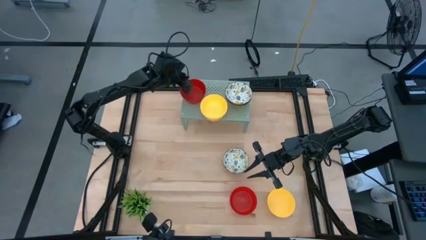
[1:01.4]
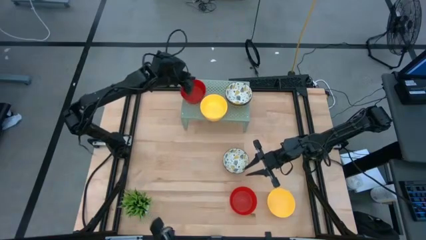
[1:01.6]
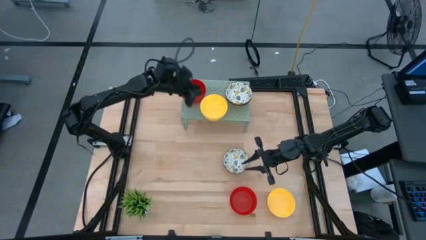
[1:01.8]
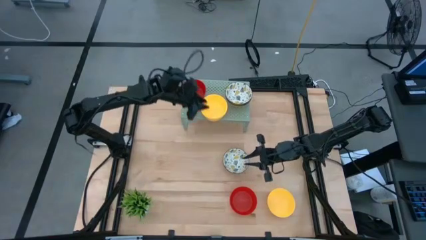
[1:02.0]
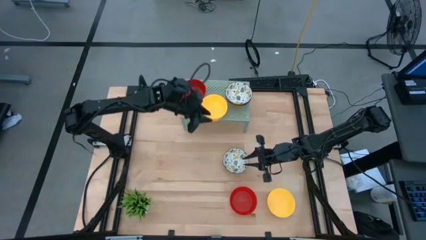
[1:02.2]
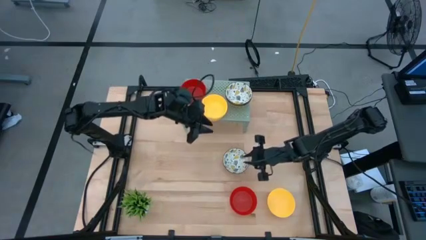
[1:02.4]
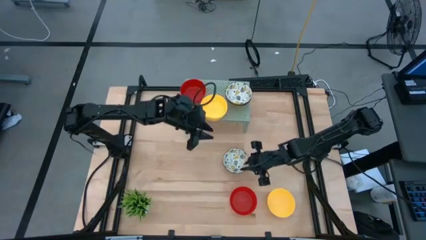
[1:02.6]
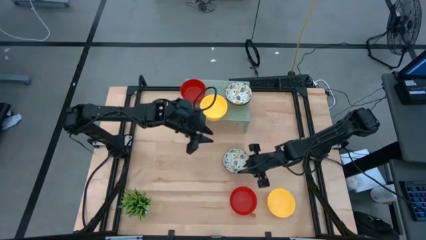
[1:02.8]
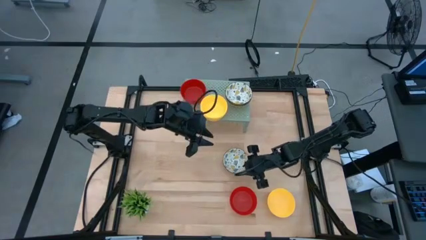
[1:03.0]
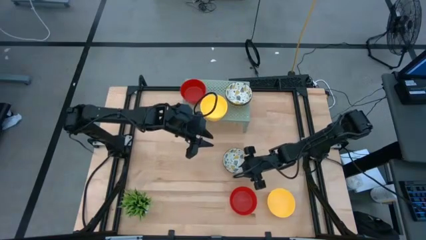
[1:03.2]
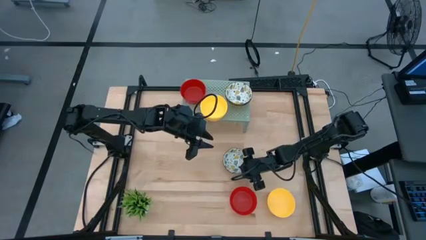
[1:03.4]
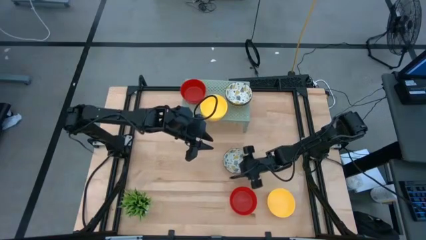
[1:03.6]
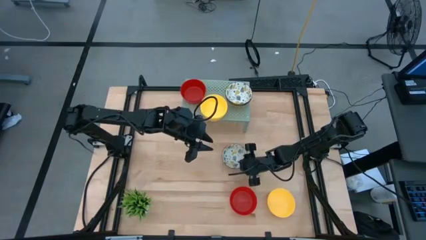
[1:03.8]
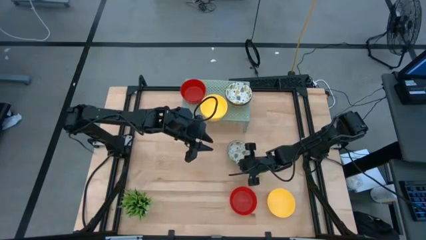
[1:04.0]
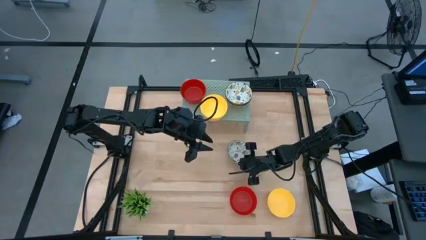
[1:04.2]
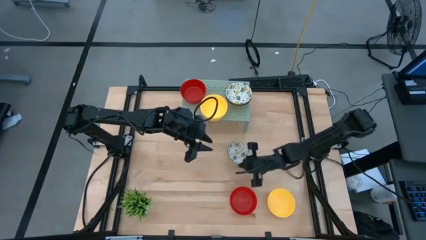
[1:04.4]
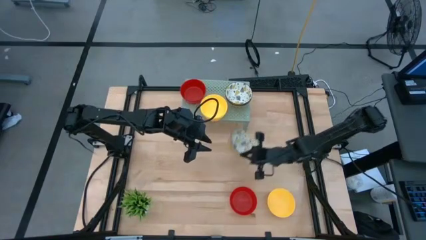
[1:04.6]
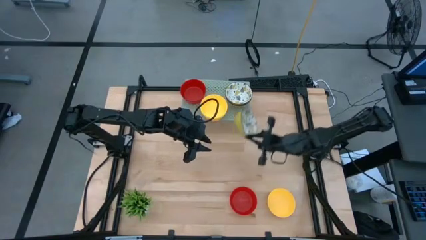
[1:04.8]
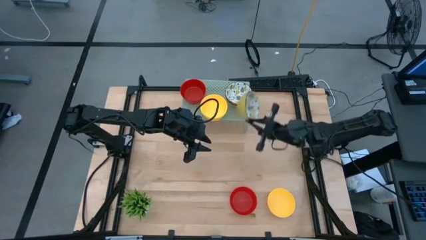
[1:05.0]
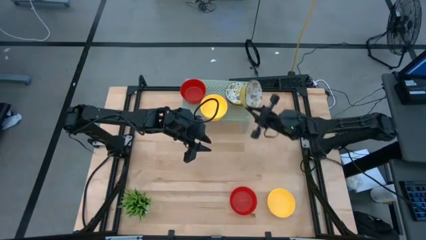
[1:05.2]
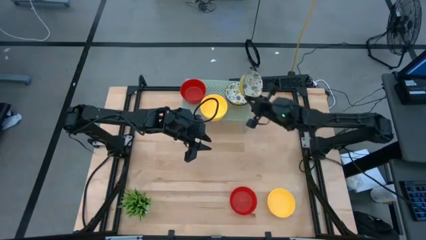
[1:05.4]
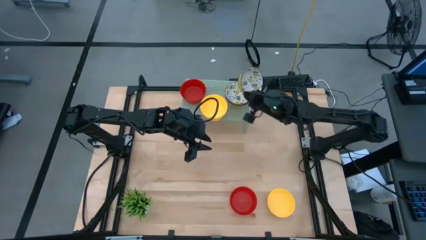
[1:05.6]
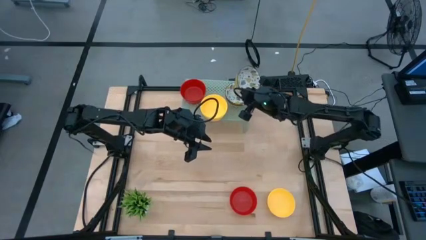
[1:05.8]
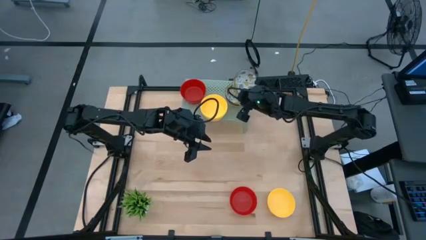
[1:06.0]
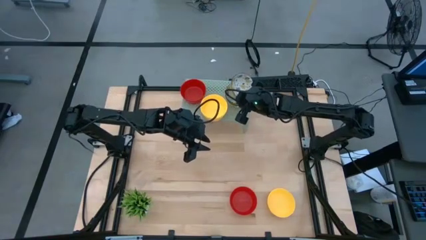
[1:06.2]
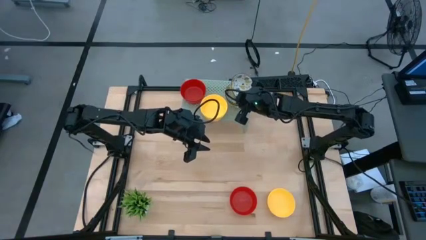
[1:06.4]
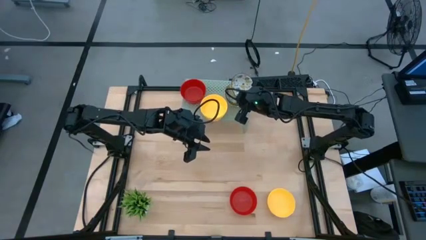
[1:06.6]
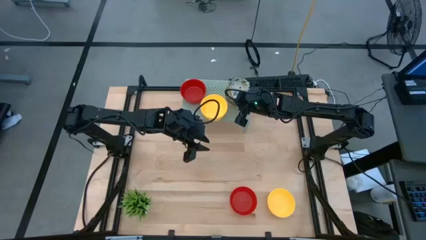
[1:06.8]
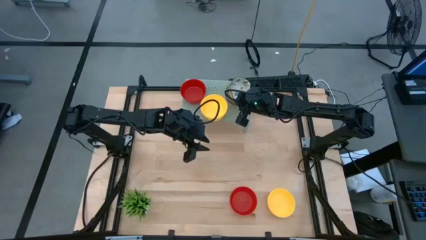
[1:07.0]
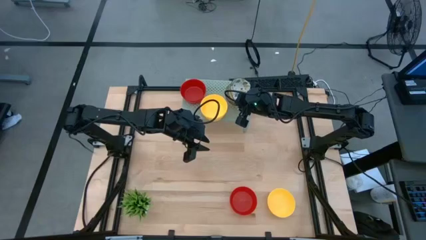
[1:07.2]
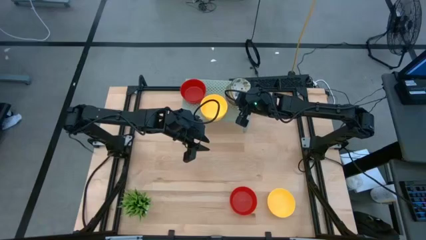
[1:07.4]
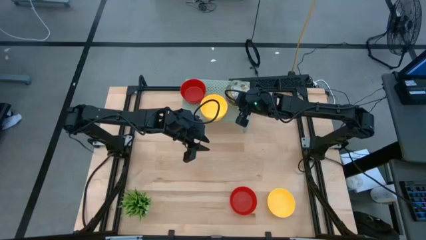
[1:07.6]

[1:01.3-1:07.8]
Task: Pick & Place Mini bowls
Stack the white patterned bowl on the white patterned bowl on the shelf

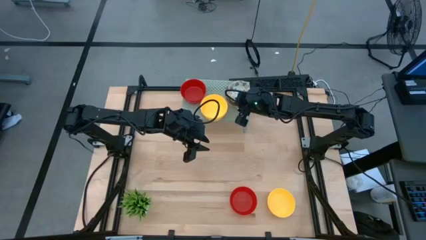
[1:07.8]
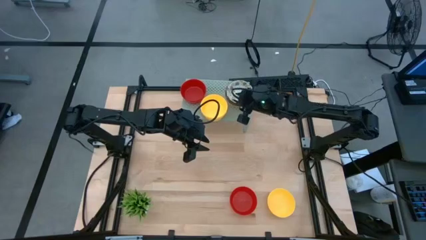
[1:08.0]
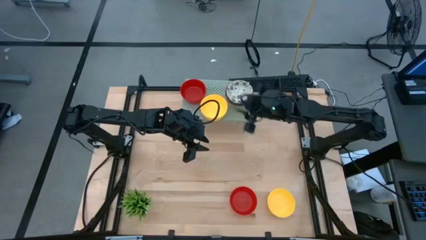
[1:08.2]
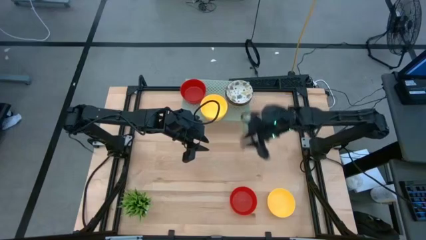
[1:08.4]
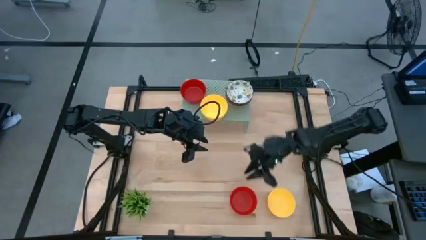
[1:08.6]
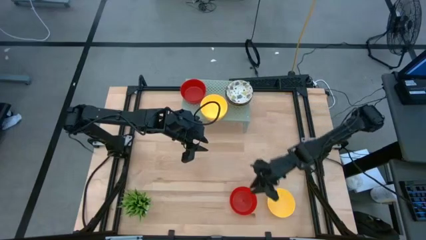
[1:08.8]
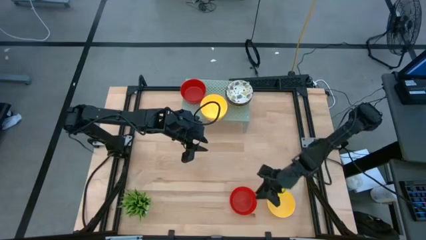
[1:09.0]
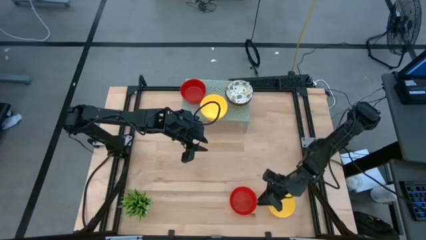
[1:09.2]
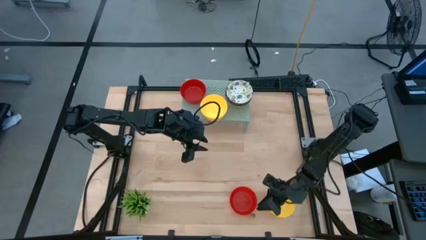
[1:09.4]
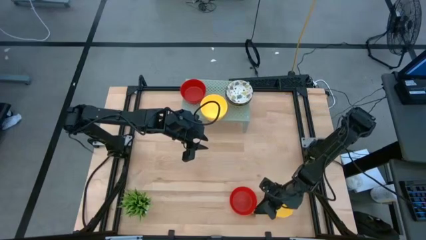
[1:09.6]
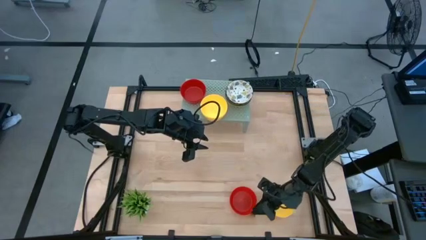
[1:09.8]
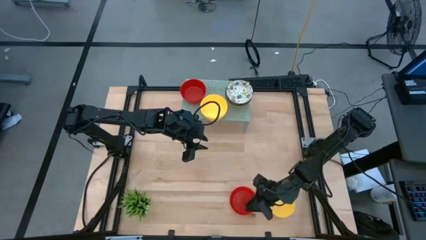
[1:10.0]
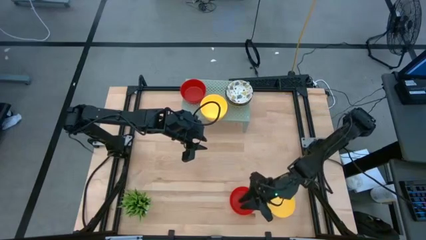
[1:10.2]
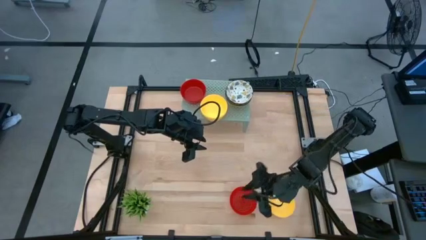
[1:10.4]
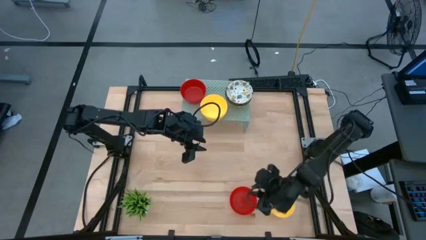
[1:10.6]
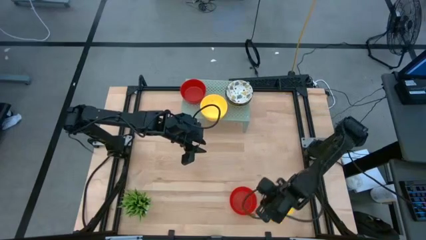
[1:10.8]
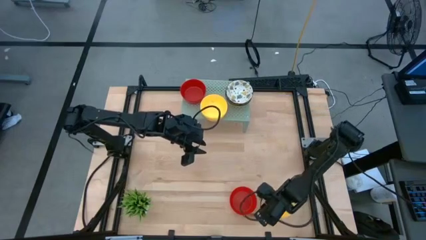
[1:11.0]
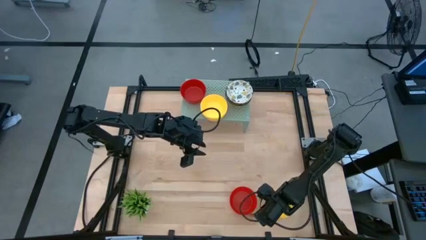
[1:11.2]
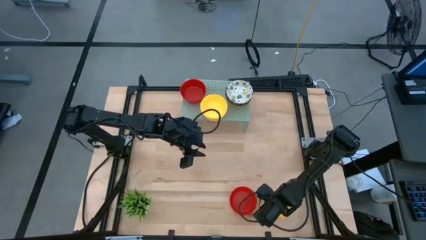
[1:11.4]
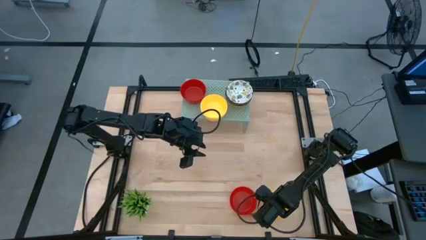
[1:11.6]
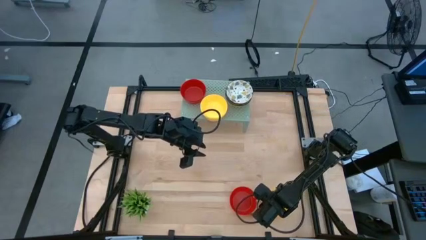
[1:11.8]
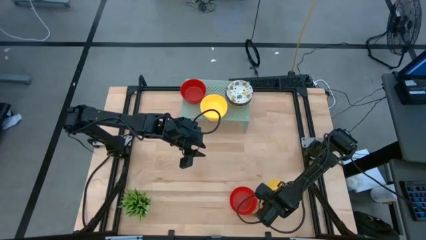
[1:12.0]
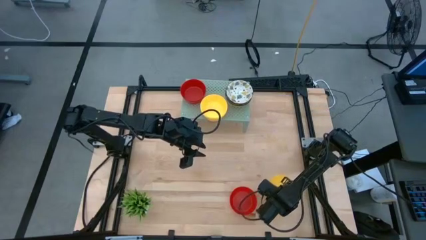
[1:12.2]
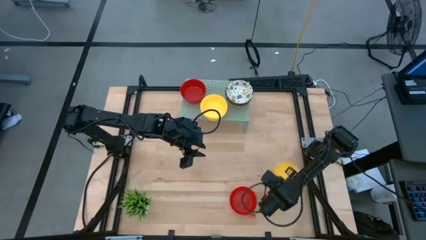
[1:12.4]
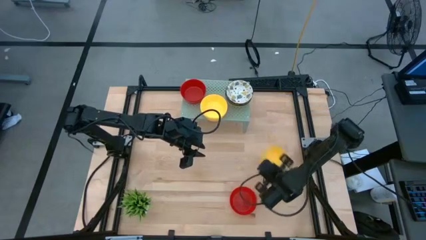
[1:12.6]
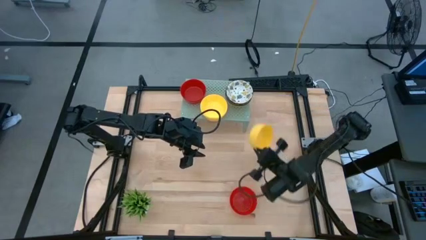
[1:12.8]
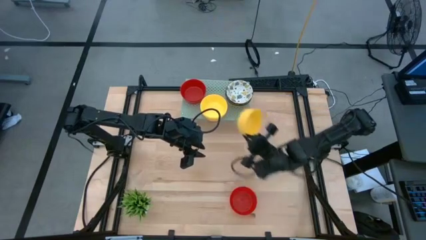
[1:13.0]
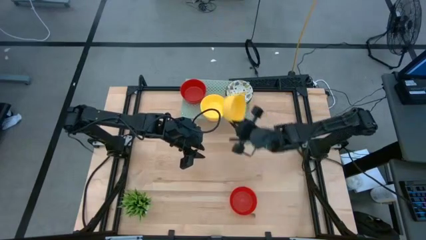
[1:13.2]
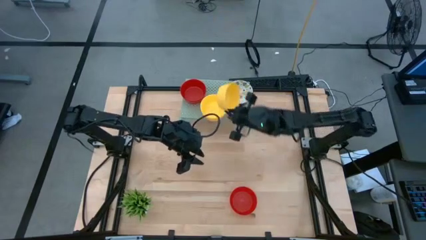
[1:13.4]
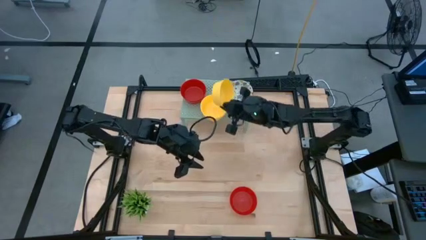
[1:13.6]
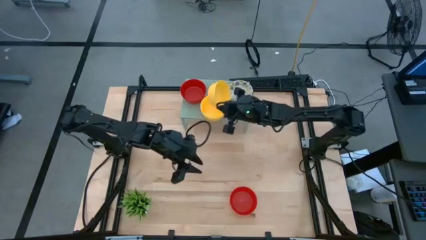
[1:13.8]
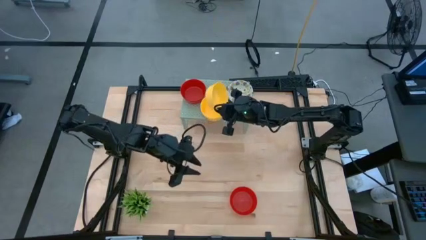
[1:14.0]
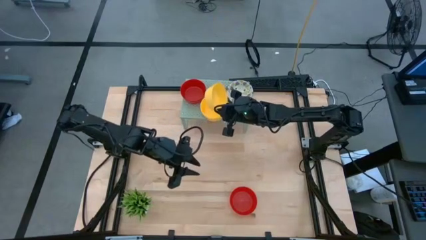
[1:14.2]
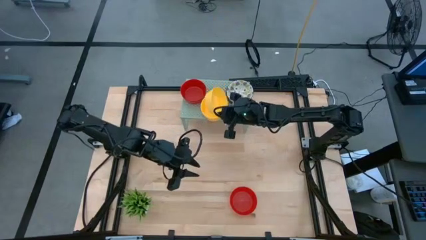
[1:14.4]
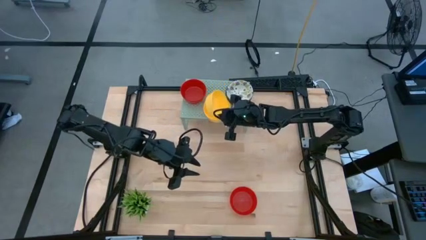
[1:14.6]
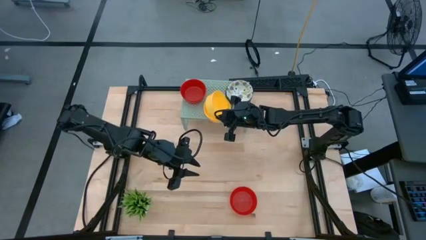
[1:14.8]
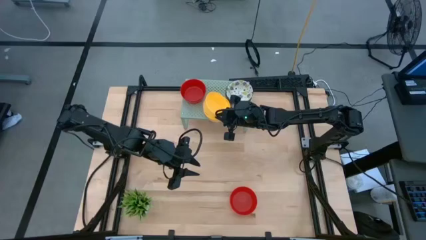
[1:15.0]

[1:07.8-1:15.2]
Stack the yellow bowl on the yellow bowl on the shelf

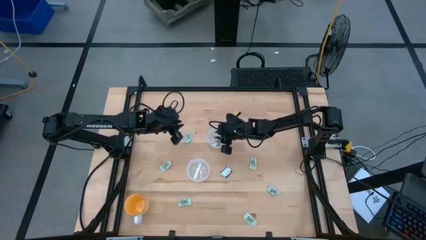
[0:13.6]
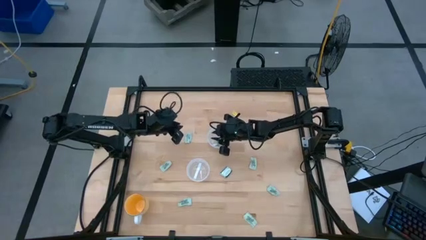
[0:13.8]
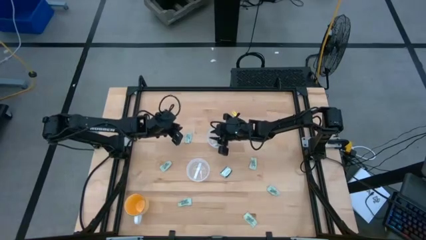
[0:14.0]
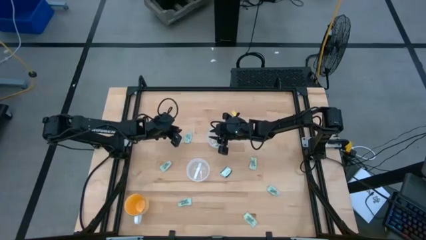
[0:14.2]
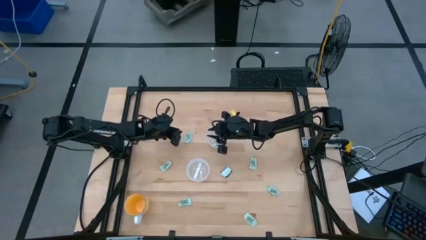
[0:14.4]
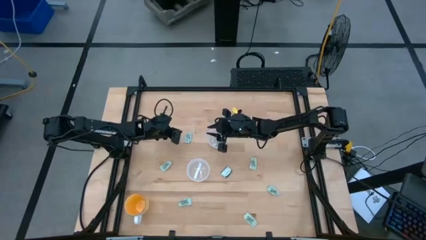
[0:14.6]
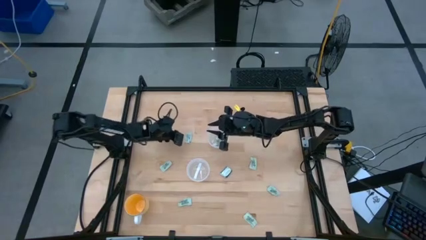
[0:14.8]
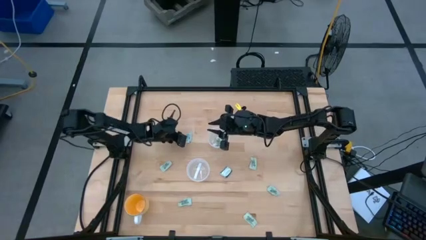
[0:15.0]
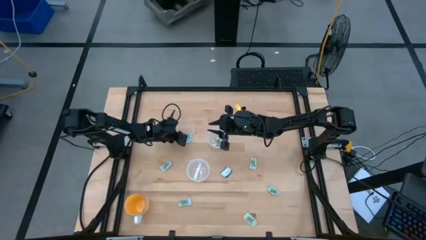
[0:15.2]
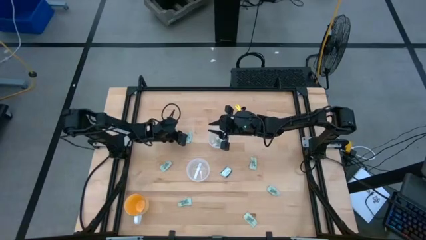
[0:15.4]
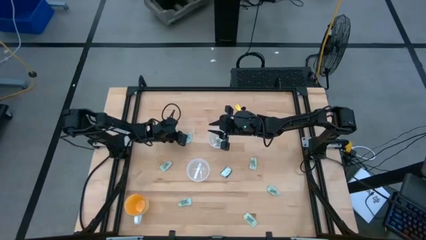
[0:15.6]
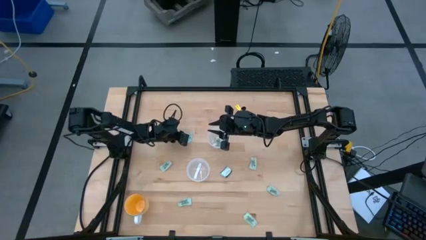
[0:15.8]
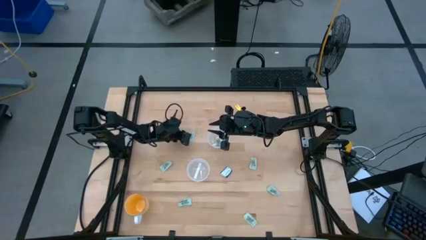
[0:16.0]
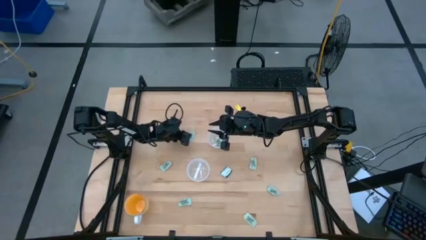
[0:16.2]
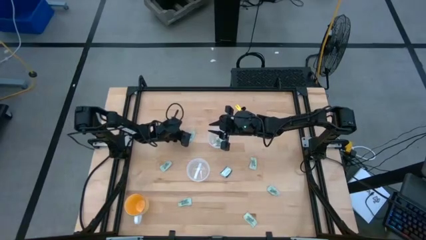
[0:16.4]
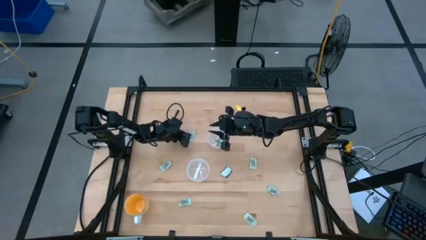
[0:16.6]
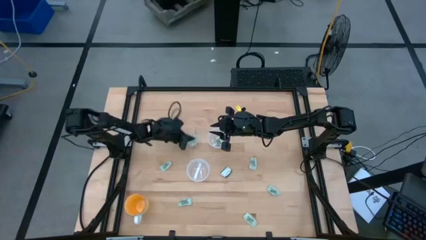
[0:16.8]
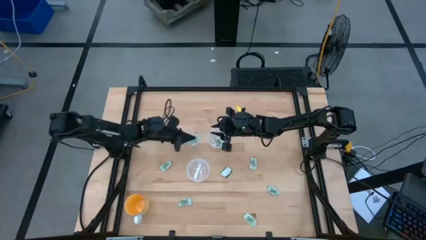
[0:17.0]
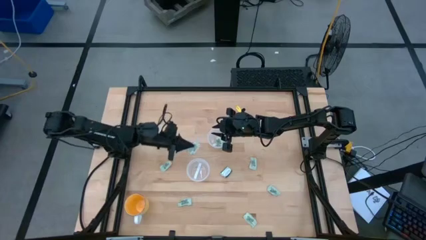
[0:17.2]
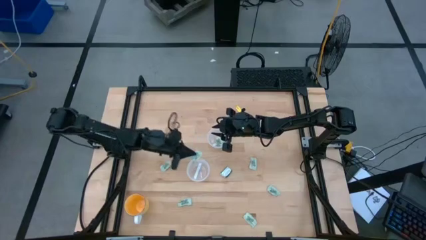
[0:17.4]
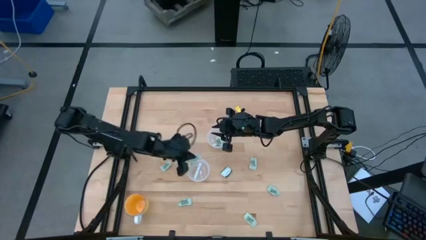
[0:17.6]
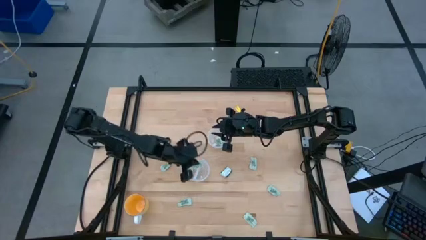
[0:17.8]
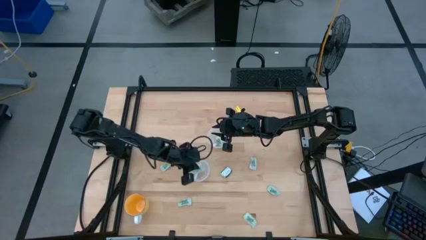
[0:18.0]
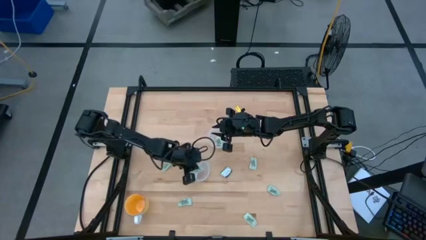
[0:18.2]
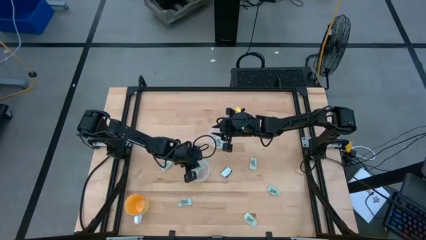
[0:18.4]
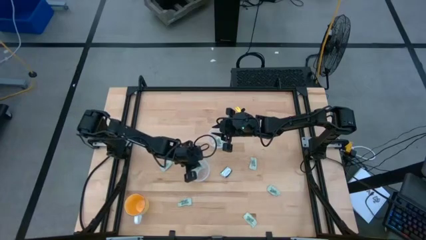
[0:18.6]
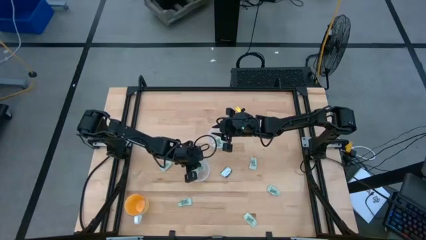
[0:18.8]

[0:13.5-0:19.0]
Task: Pick and place Stevia / Truvia into bins
Put the stevia packet into the bottom transparent container
